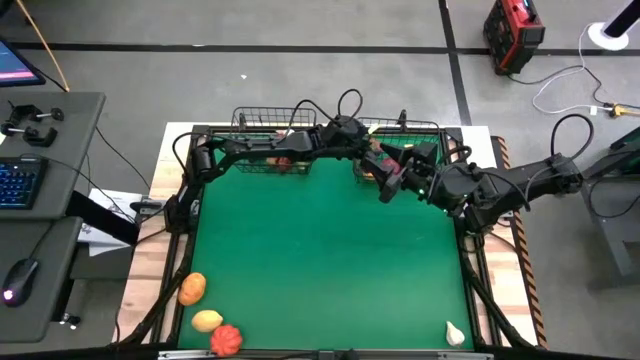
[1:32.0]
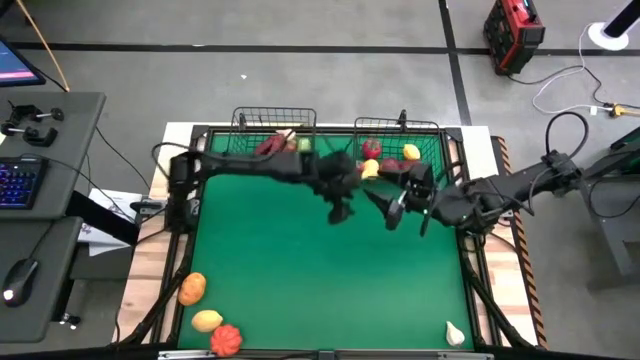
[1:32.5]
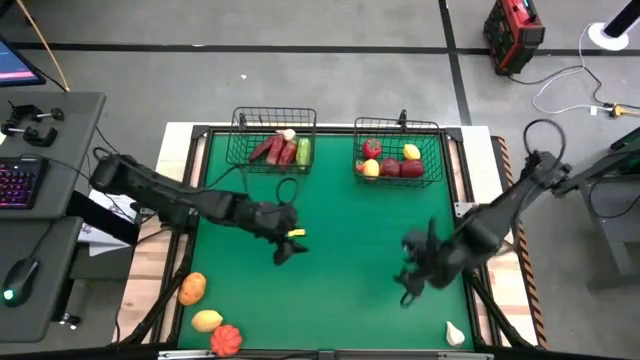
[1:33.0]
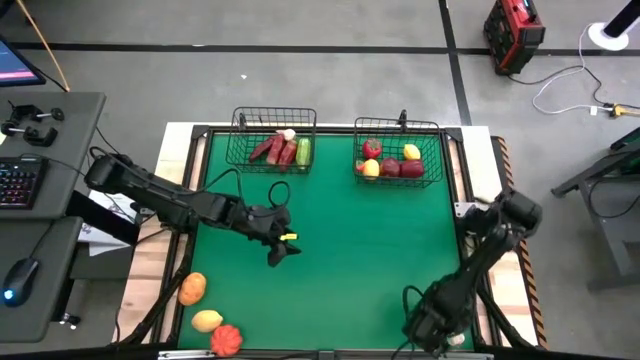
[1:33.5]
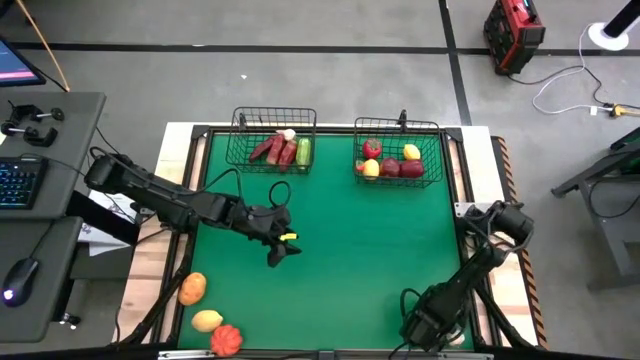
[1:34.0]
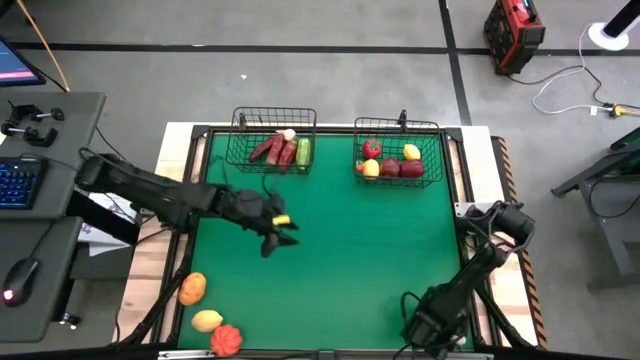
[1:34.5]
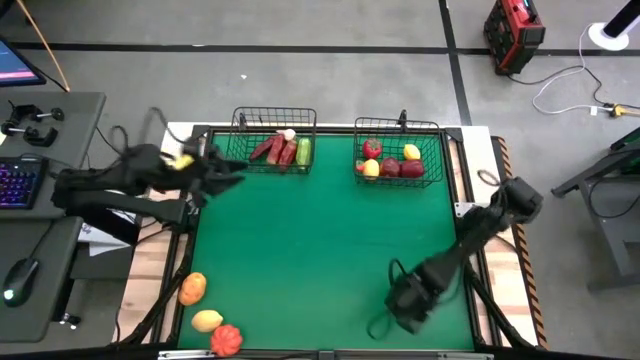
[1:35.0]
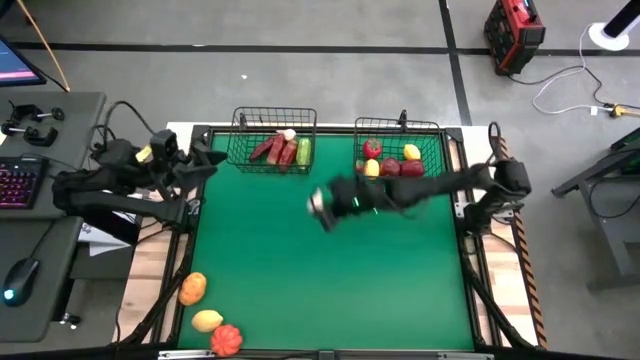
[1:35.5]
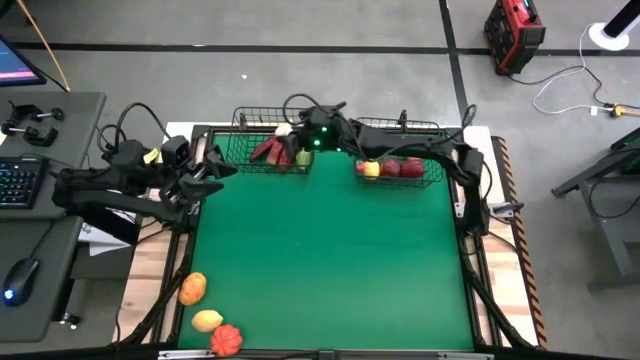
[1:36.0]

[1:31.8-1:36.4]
Task: Sort produce into baskets
Put the white garlic into the left wire basket

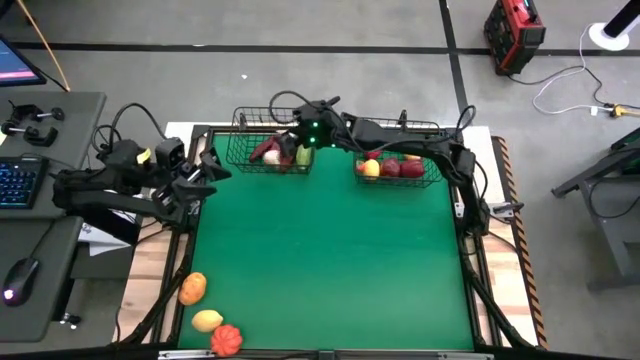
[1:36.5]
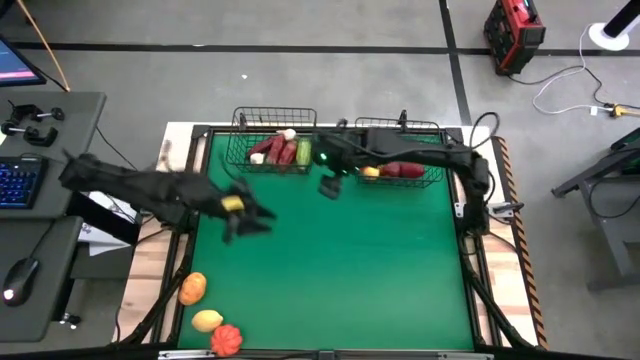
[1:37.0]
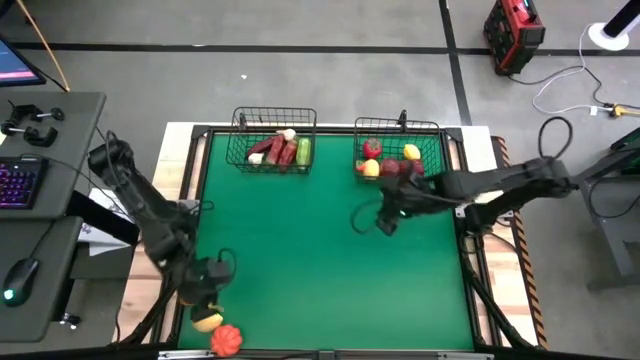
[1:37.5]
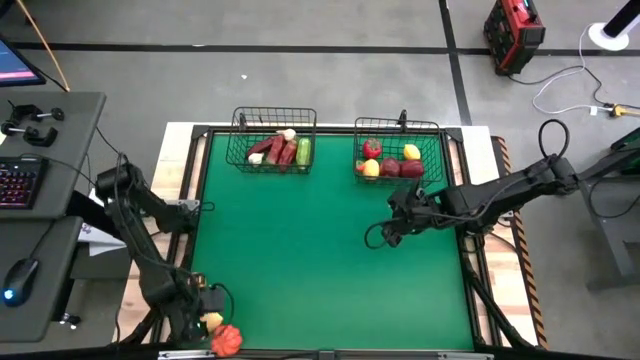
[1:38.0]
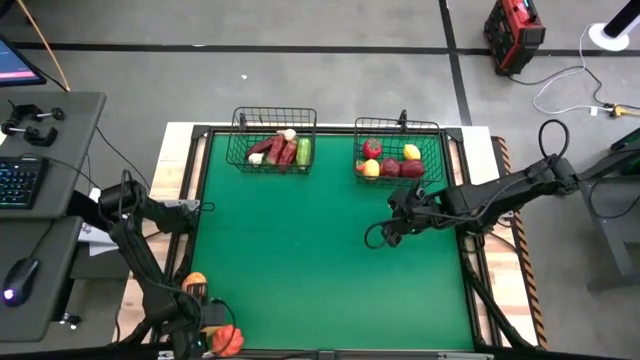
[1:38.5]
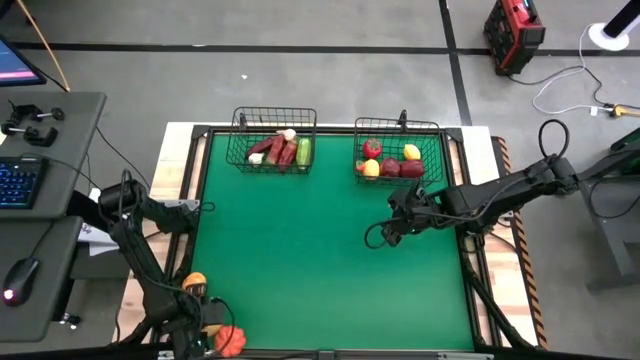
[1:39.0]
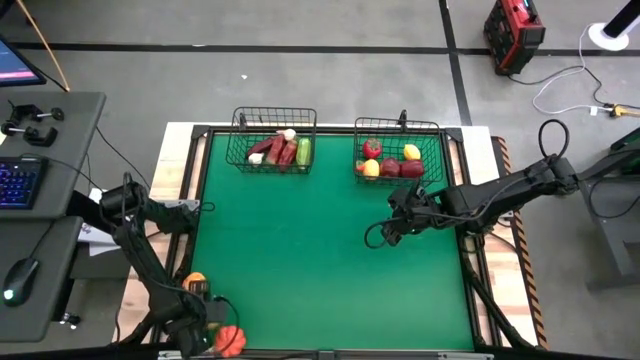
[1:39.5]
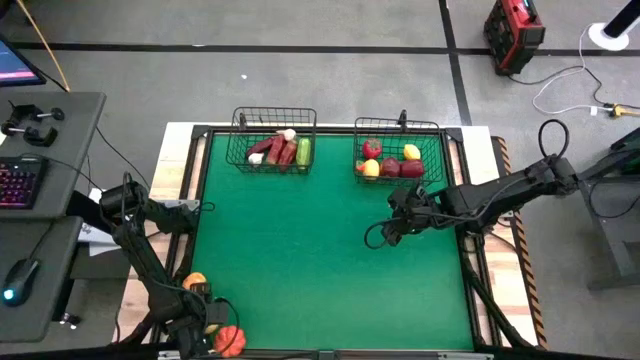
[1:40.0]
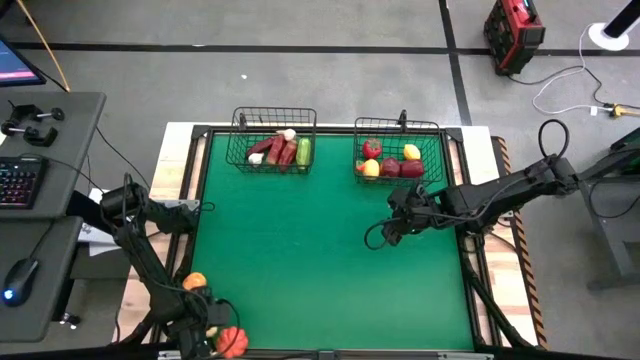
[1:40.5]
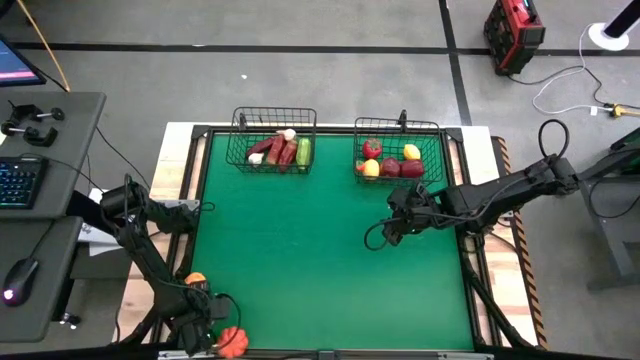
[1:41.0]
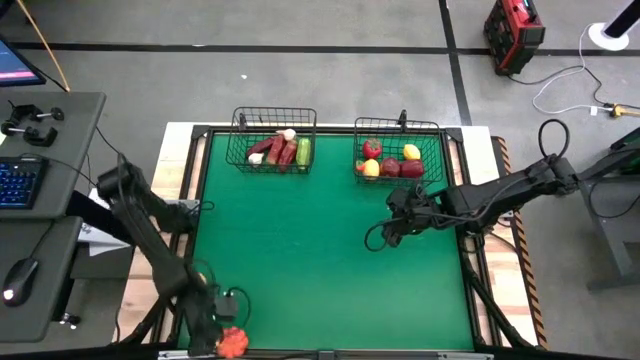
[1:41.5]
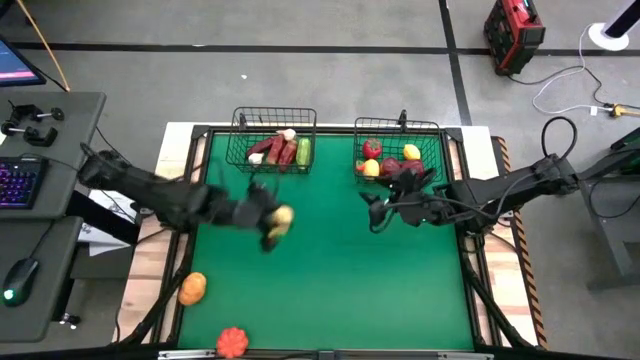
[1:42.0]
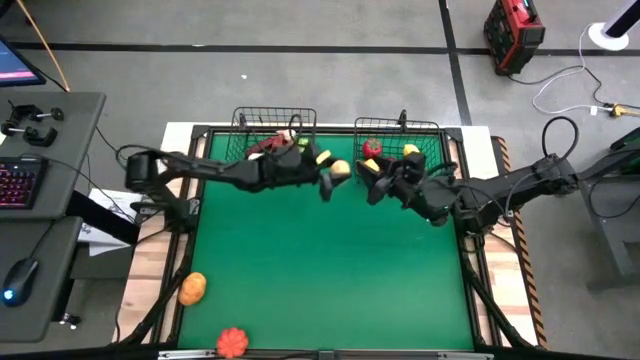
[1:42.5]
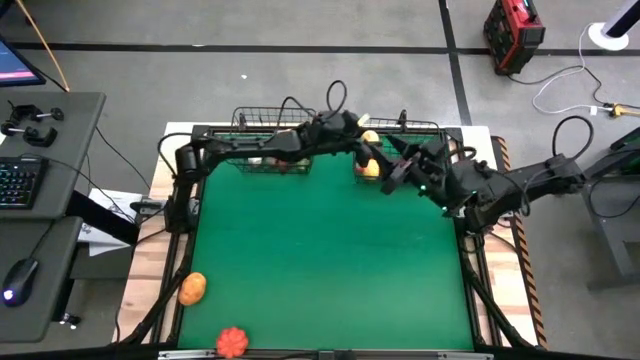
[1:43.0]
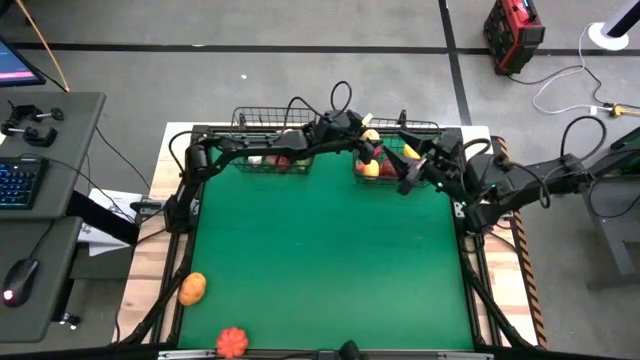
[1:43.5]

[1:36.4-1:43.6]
Put the yellow lemon into the right wire basket

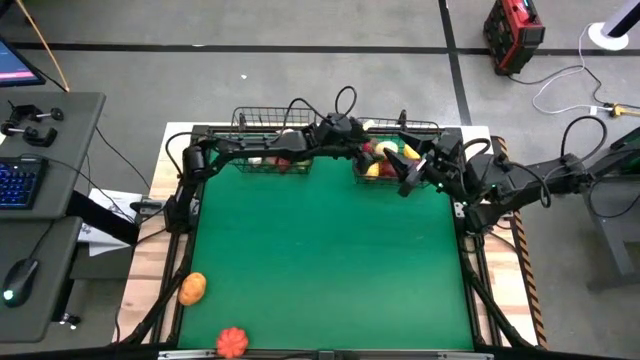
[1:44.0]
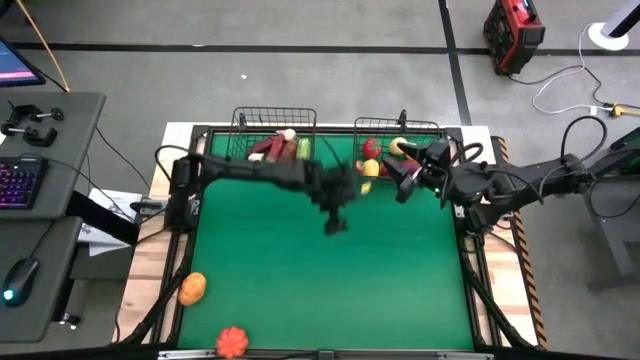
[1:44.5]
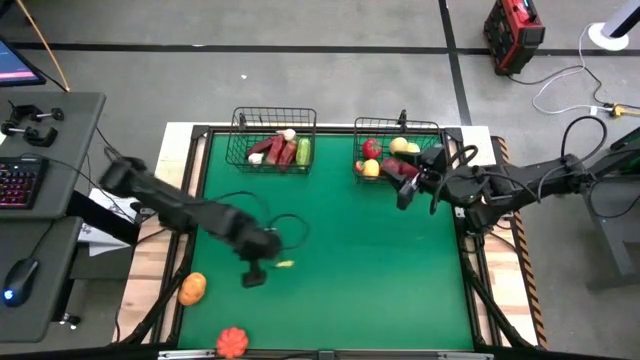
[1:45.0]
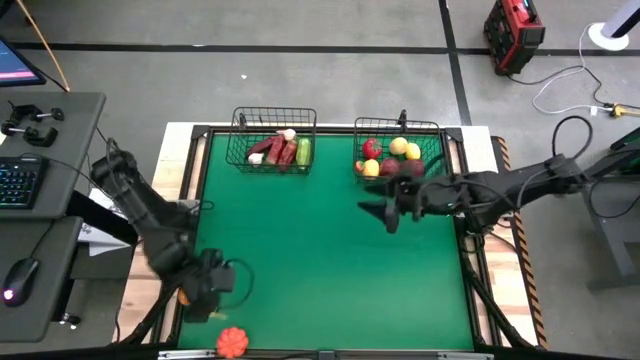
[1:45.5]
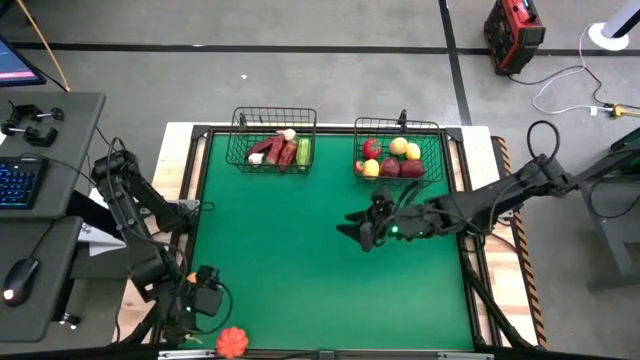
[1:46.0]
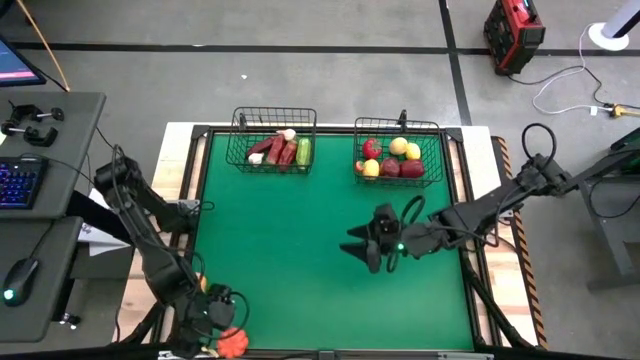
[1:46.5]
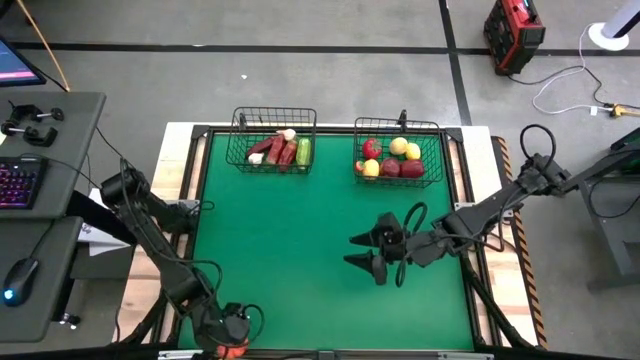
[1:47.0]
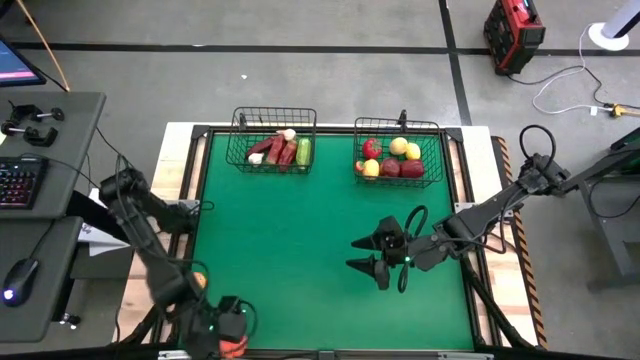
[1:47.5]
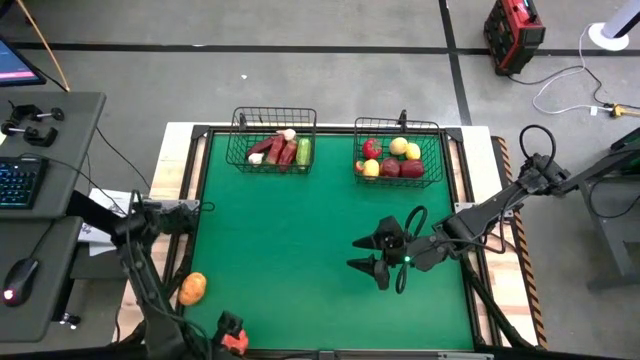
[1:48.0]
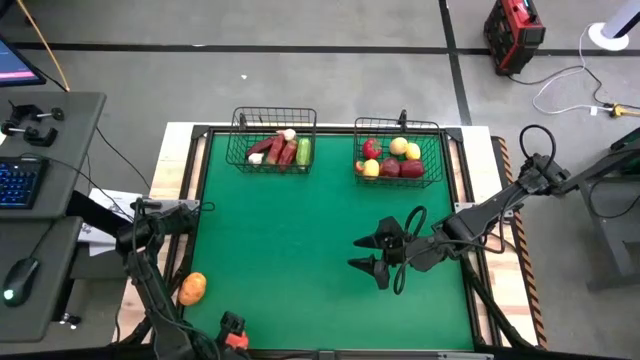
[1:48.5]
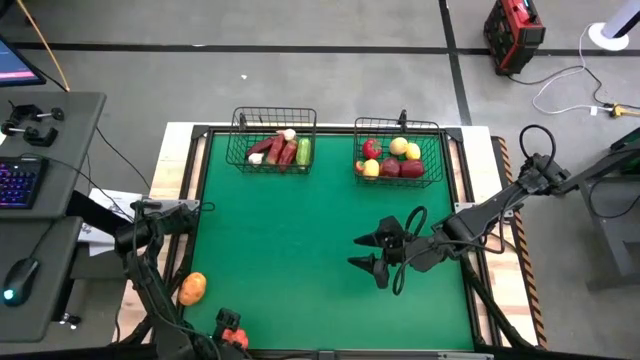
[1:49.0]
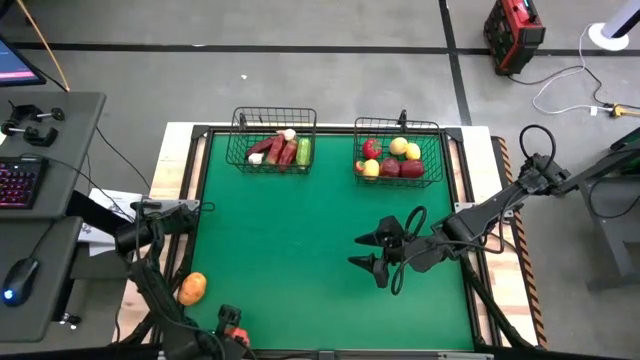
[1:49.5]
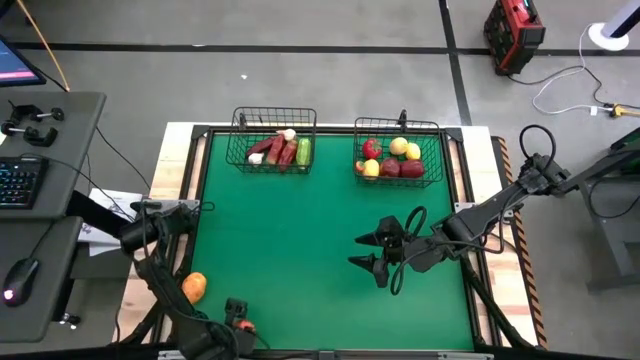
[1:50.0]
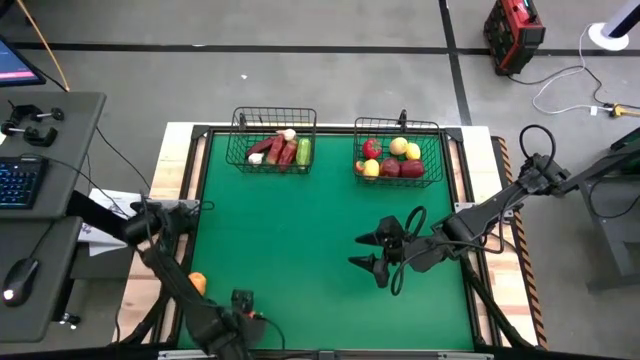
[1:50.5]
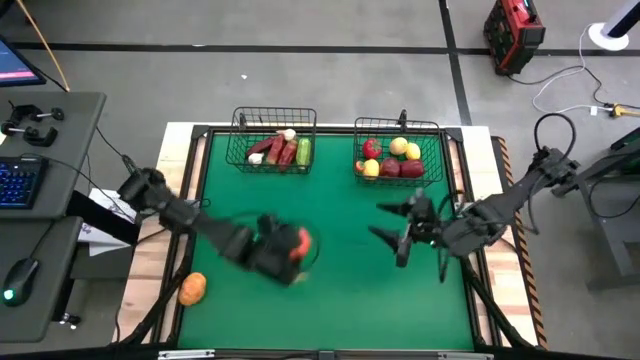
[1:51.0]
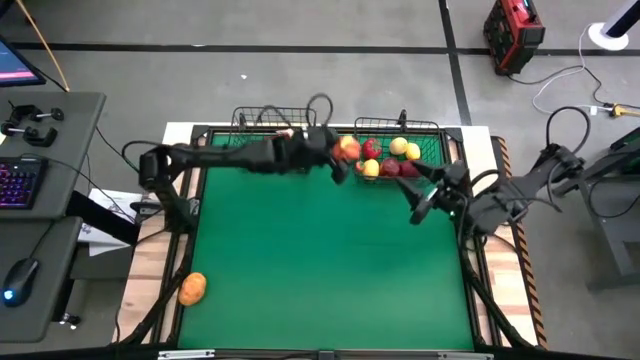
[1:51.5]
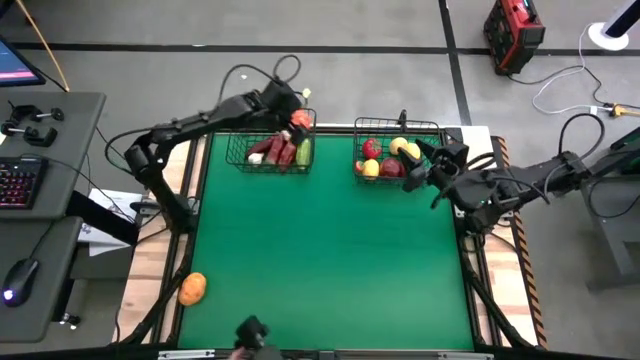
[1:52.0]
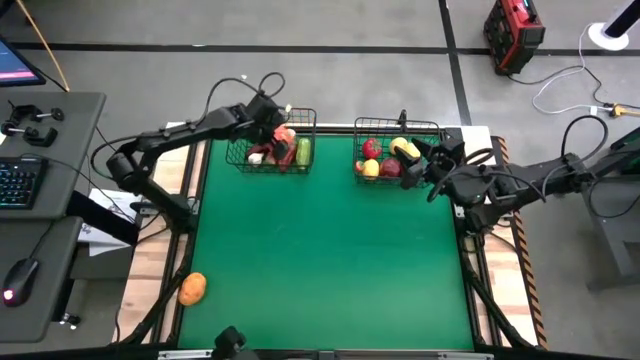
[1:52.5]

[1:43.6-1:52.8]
Put the orange pumpkin into the left wire basket
